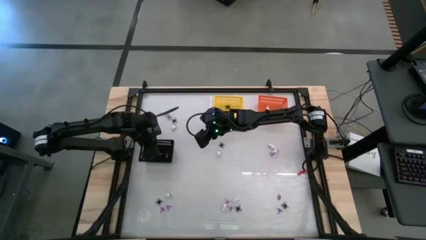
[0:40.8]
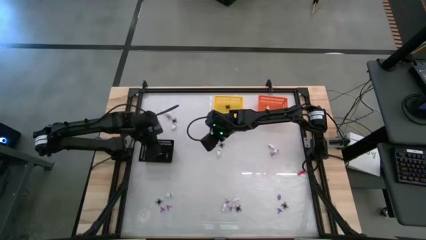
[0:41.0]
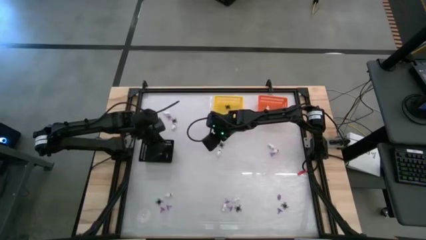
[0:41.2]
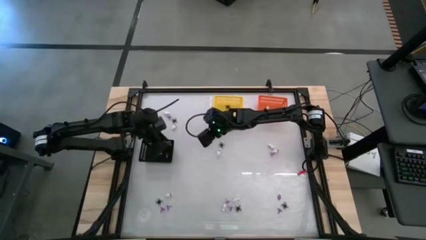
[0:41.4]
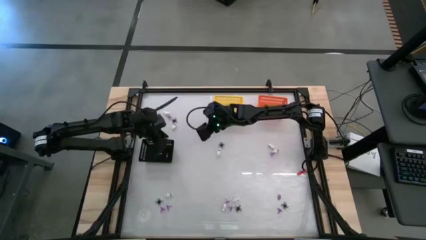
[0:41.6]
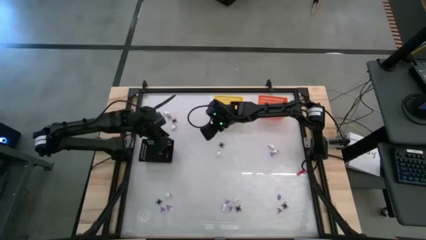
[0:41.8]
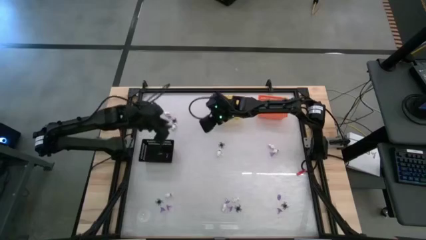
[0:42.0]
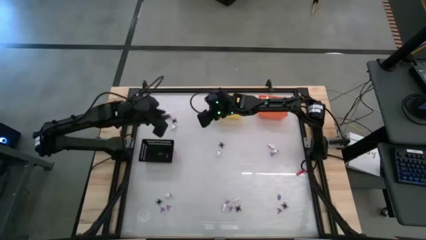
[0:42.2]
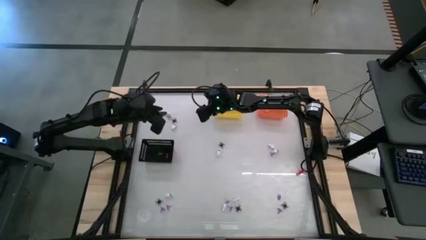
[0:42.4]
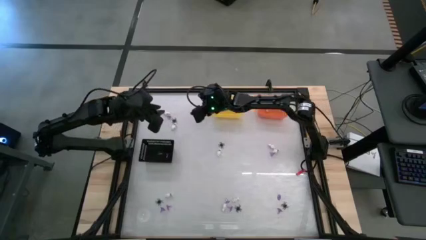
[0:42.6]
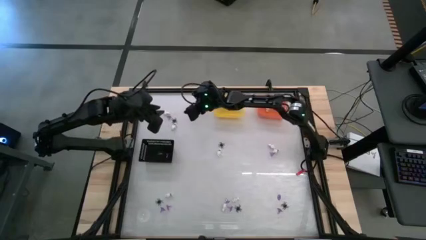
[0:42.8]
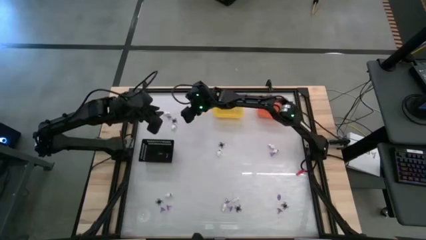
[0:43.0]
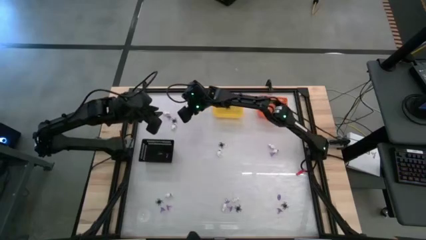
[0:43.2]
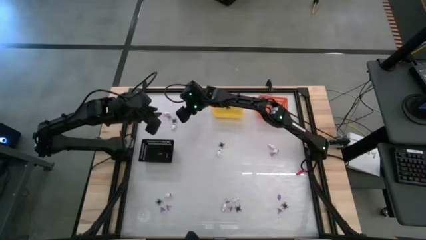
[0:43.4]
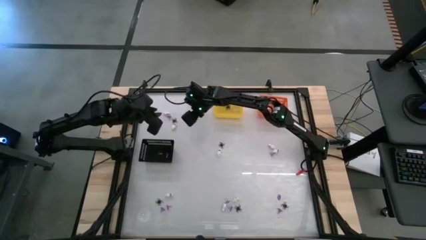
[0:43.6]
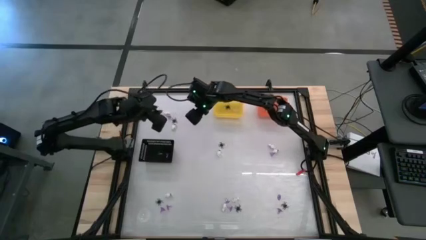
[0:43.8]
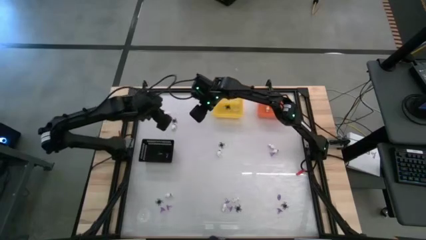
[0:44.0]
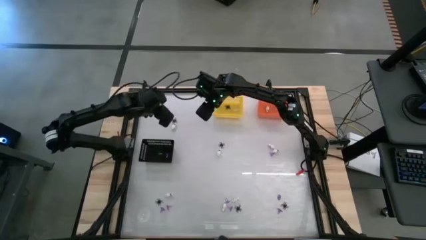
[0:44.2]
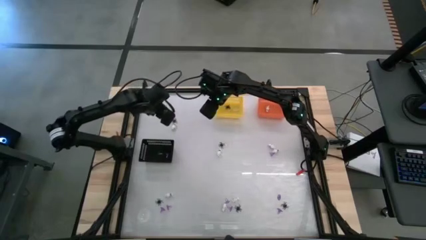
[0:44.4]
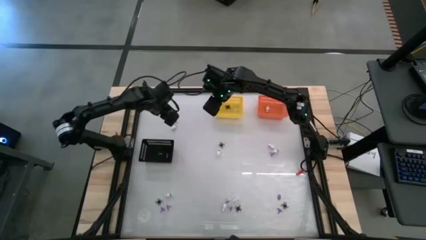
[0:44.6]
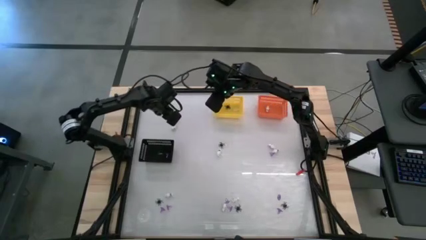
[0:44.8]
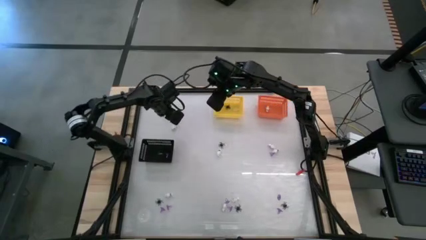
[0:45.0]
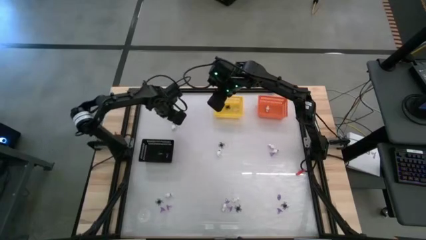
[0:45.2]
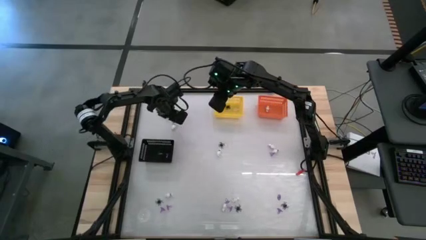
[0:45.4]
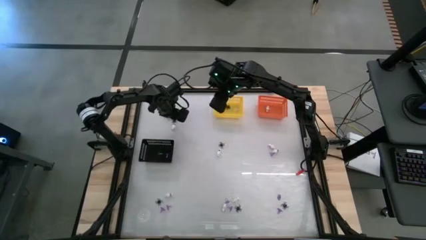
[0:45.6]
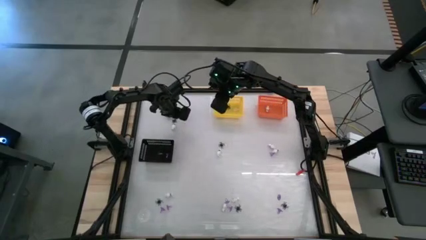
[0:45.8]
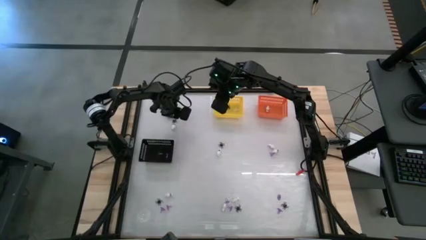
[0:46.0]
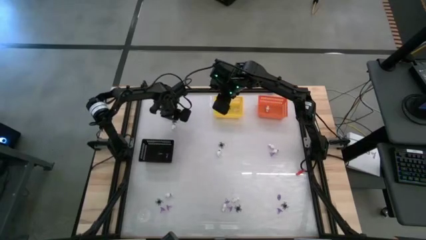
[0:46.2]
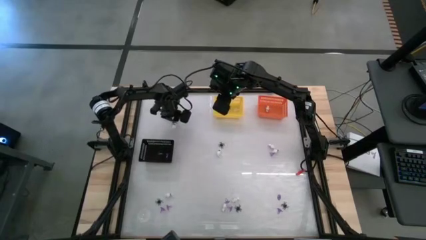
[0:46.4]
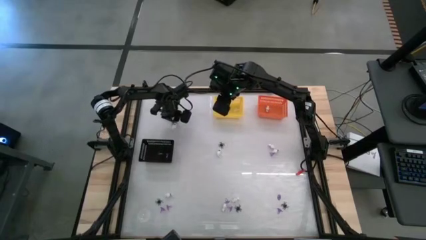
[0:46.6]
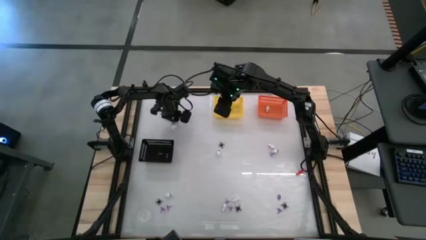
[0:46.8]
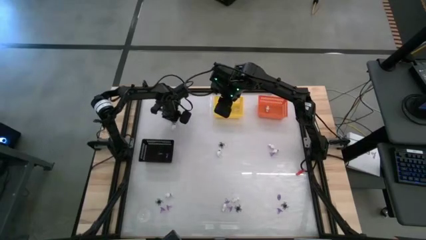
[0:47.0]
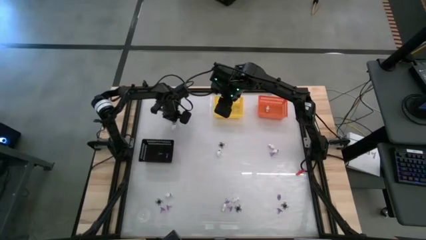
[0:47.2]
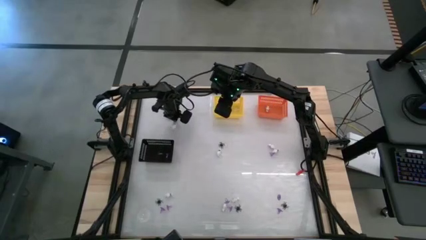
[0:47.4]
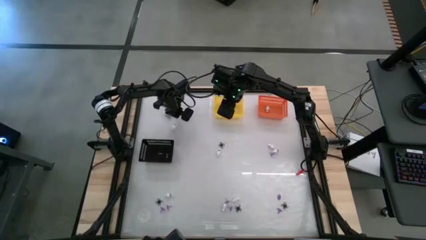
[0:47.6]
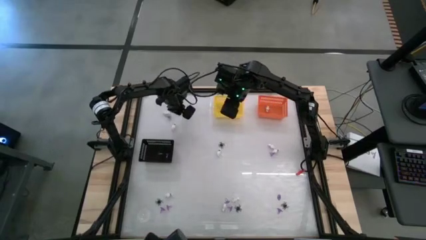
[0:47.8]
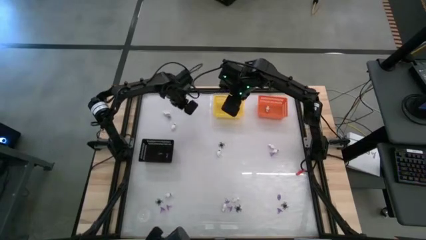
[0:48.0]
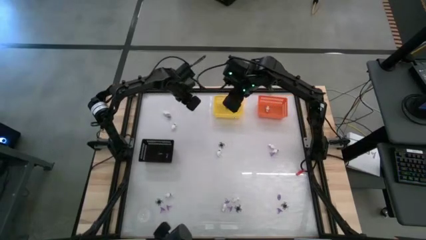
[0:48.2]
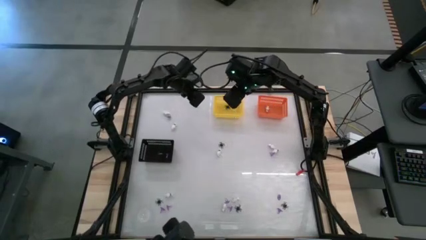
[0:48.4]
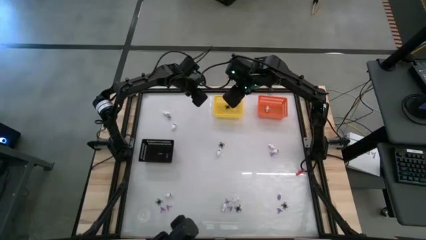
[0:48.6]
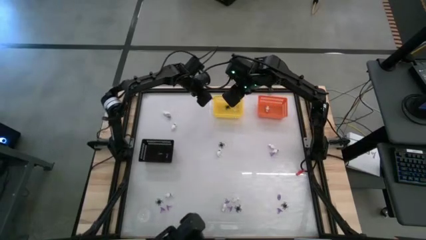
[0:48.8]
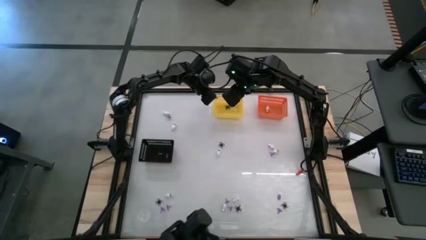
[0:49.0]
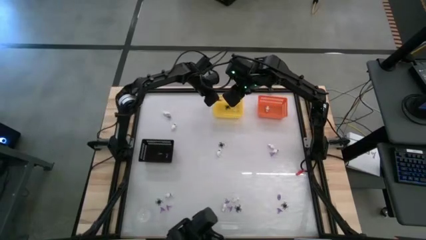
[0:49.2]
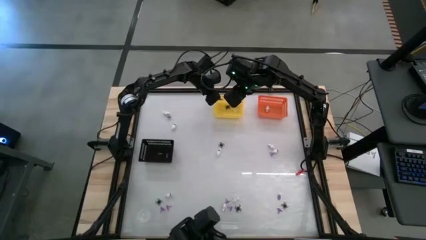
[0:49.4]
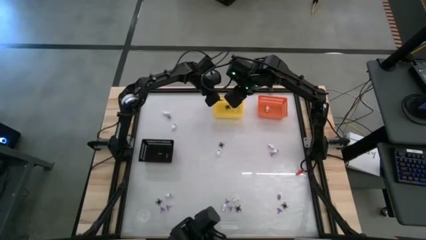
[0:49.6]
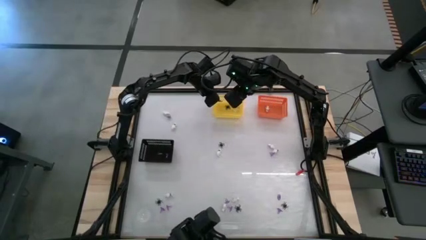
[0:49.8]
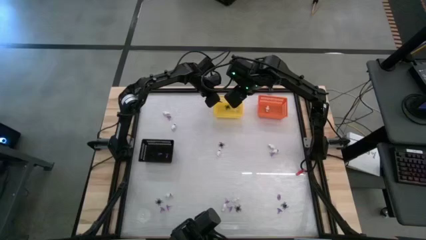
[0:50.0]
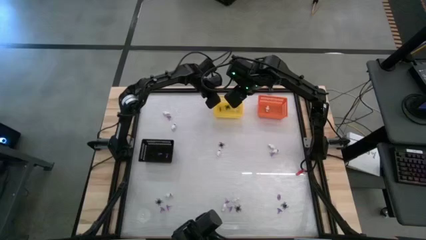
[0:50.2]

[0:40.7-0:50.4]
Task: Sort Halloween decoration
Put the black spider toy into the yellow bin

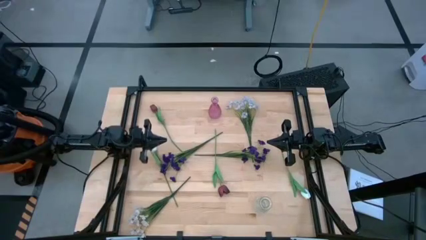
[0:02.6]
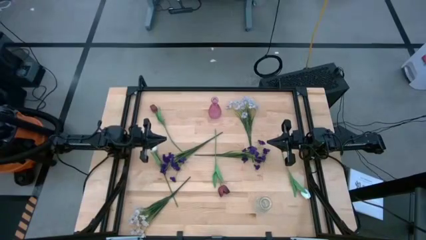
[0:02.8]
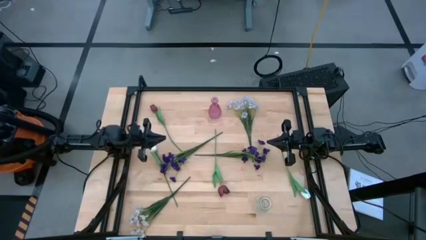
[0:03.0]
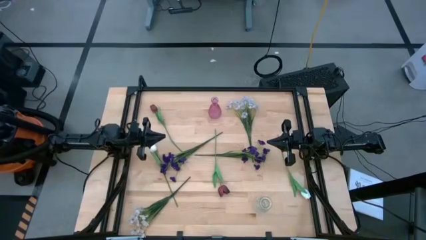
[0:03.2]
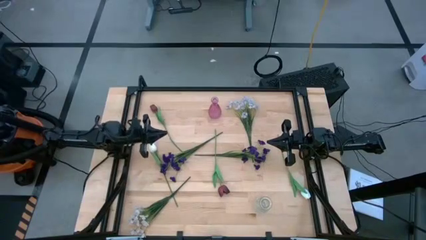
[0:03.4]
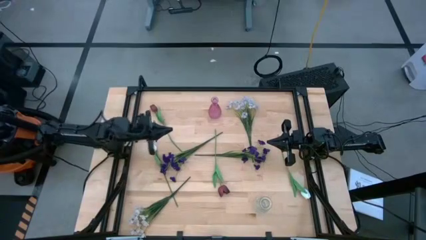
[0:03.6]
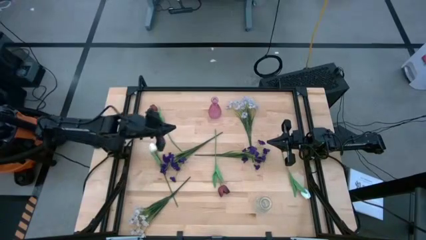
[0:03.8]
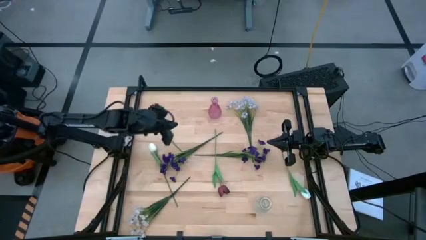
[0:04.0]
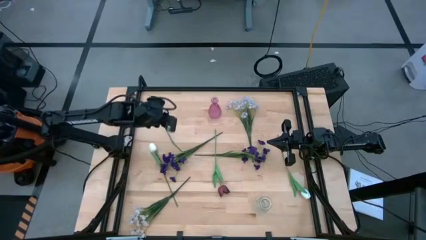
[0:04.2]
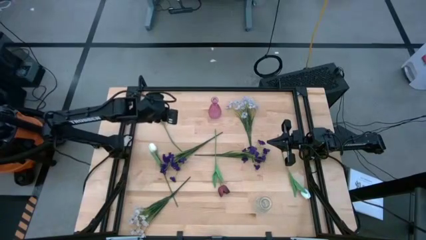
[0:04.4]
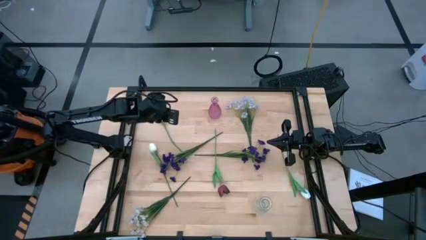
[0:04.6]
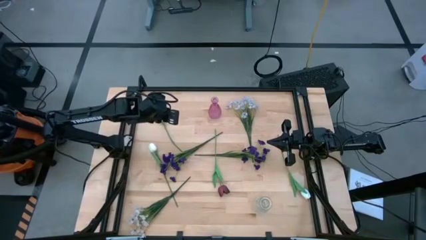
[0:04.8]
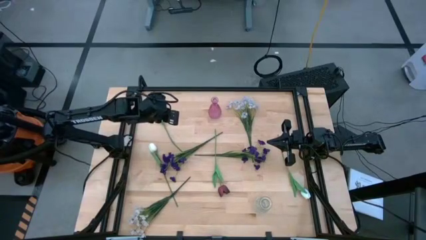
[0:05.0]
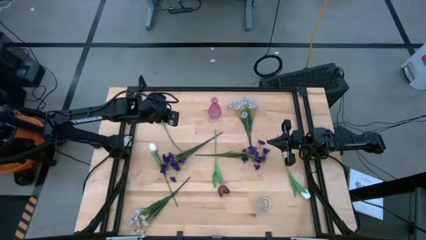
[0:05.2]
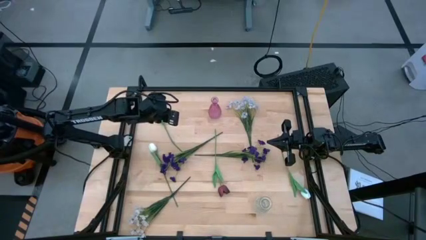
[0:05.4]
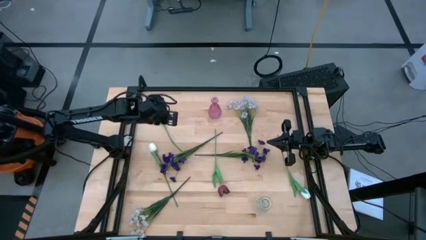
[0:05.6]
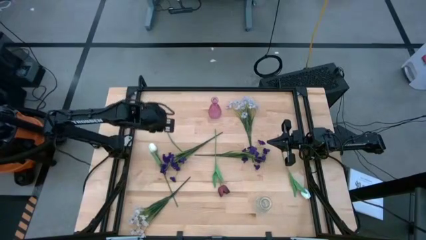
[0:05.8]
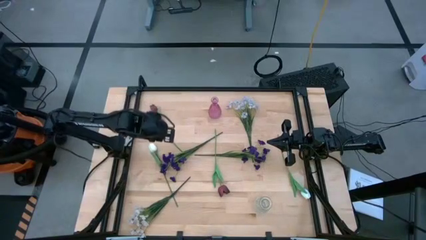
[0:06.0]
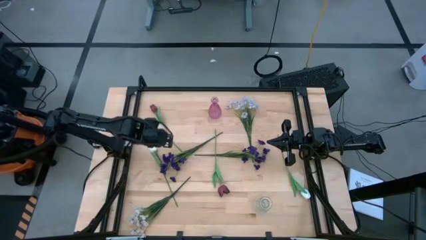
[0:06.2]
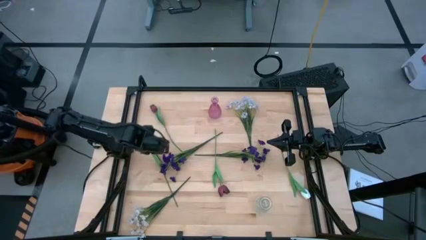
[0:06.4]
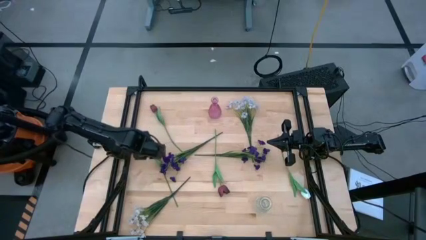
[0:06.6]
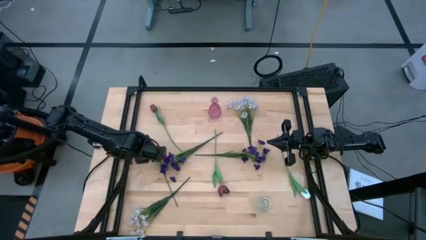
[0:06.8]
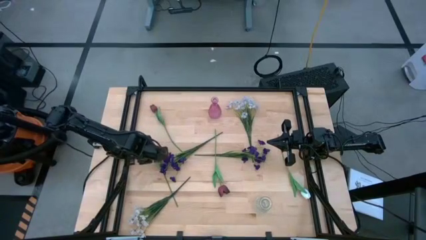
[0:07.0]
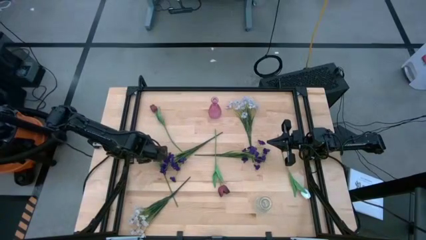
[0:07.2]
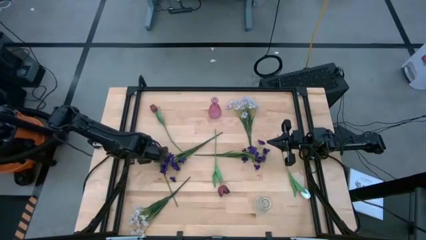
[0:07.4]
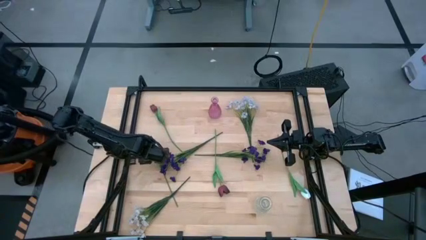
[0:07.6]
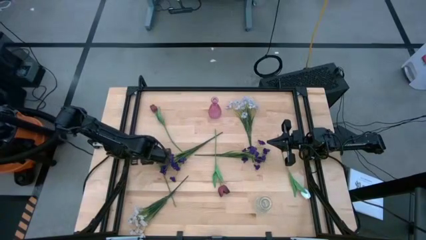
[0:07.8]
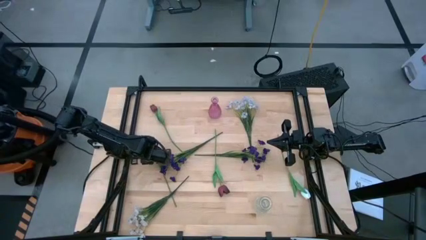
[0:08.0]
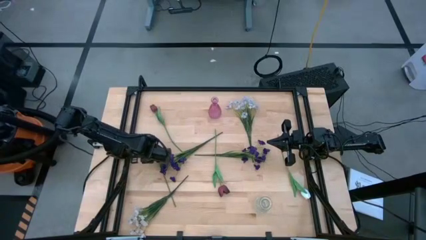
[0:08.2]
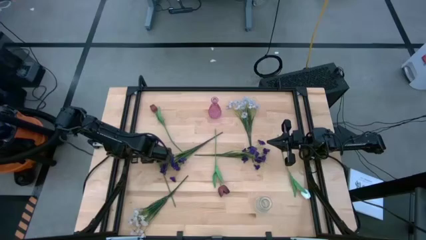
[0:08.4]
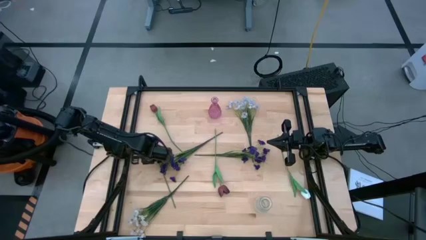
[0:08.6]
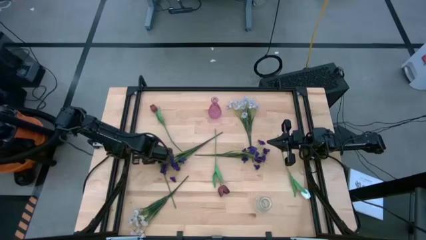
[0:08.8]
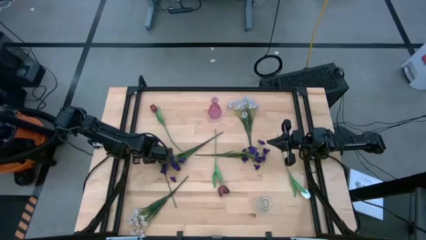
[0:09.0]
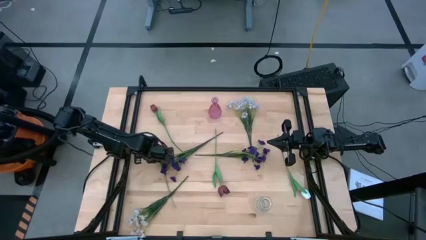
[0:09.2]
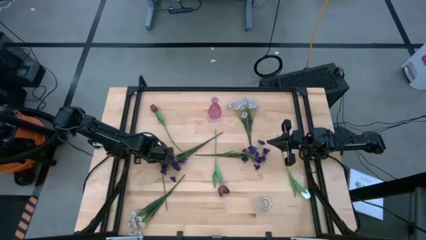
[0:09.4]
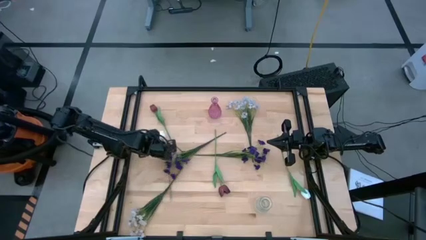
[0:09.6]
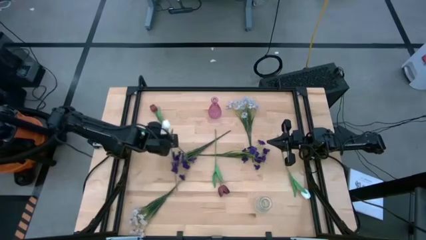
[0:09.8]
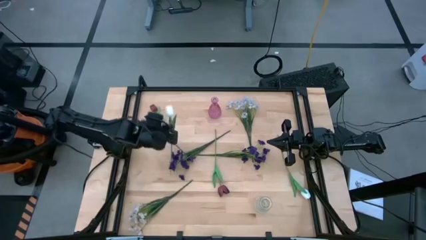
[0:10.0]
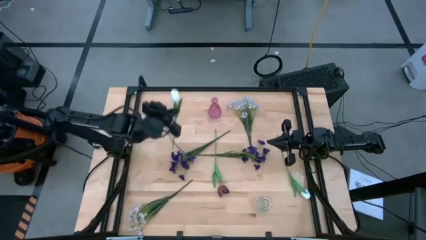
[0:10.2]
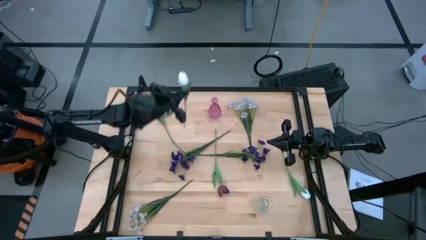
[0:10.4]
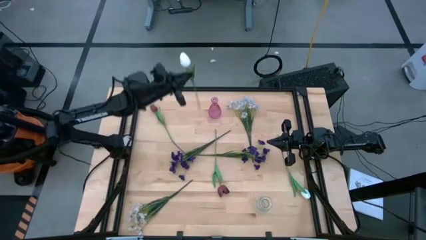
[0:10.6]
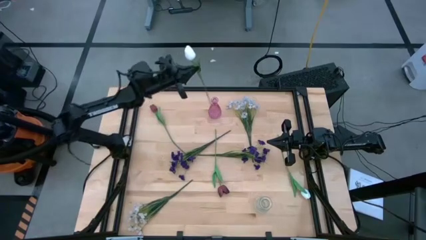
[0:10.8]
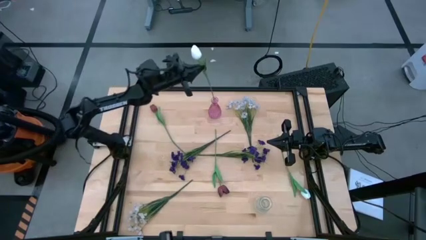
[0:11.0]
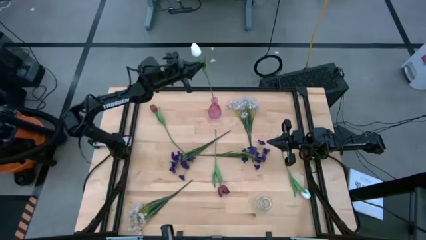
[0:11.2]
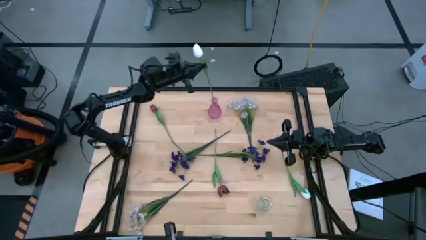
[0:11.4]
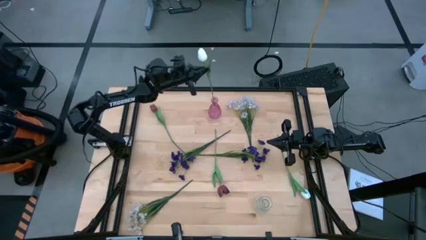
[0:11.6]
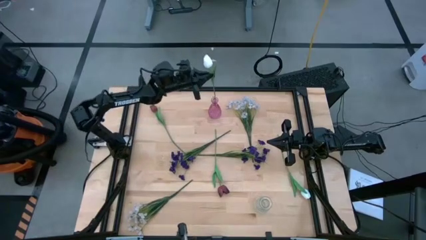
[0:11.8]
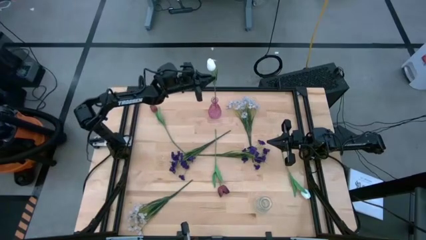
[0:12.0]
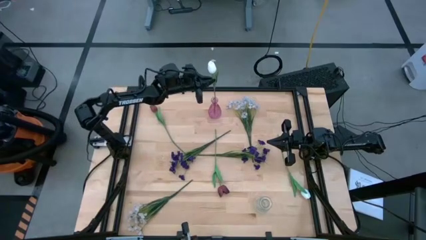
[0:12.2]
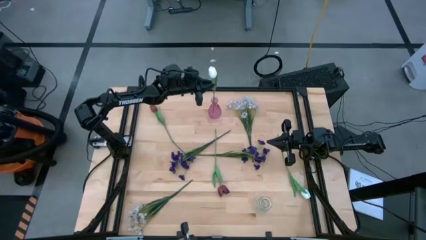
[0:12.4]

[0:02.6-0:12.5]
Task: Sort flowers into vase by color
Put the left white tulip into the pink vase
